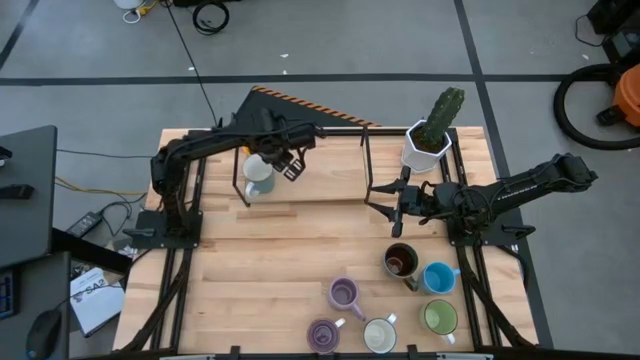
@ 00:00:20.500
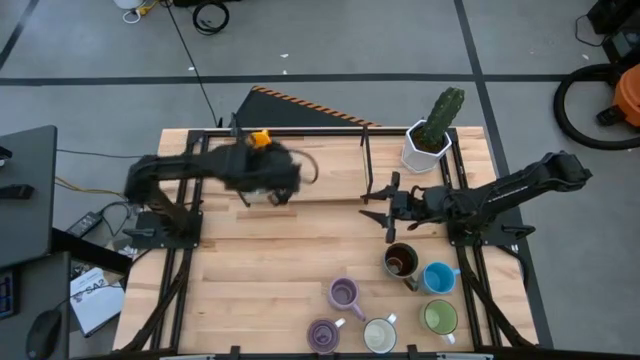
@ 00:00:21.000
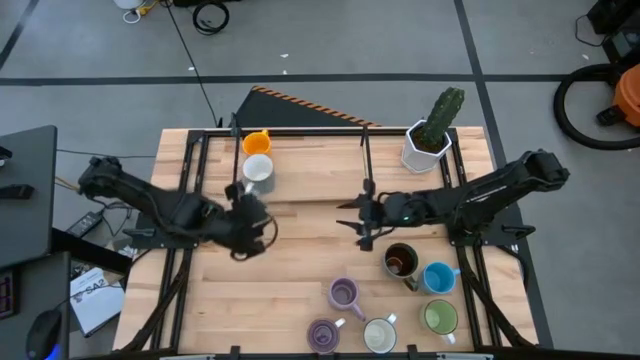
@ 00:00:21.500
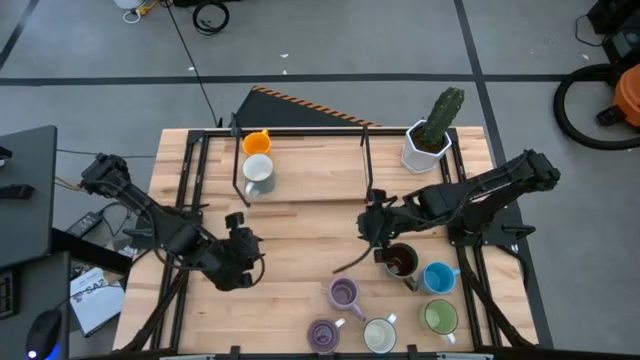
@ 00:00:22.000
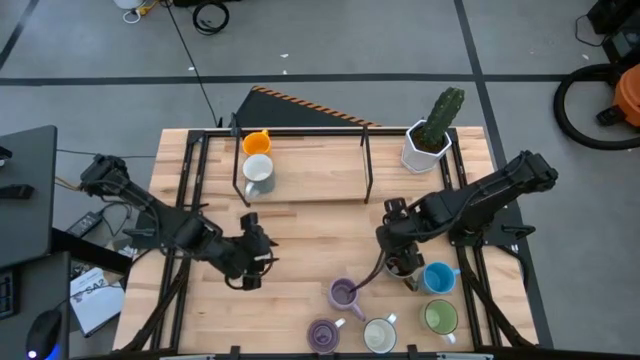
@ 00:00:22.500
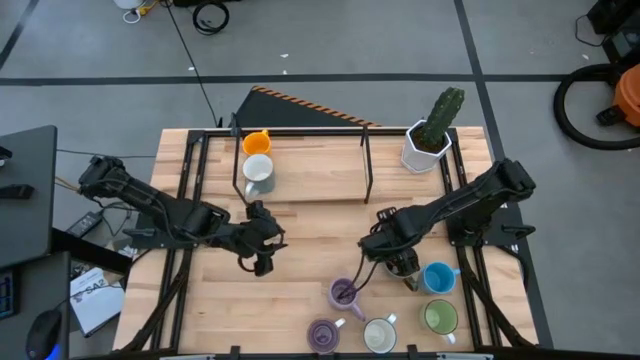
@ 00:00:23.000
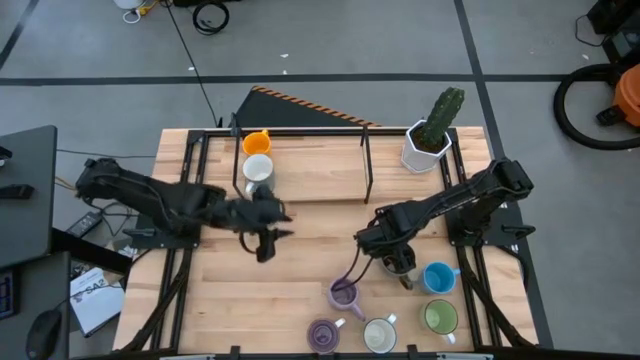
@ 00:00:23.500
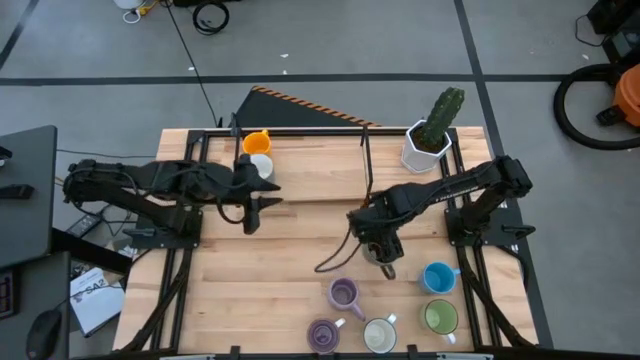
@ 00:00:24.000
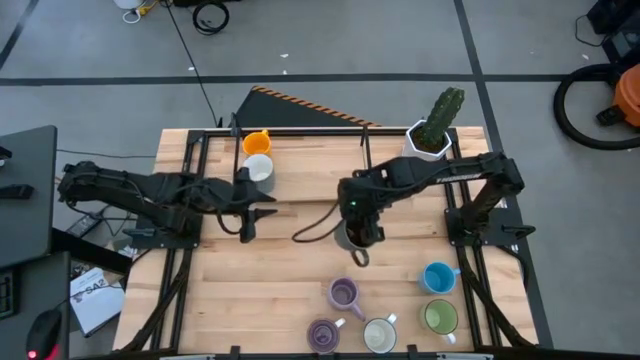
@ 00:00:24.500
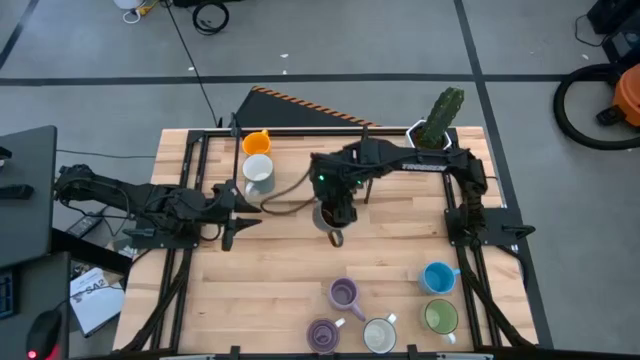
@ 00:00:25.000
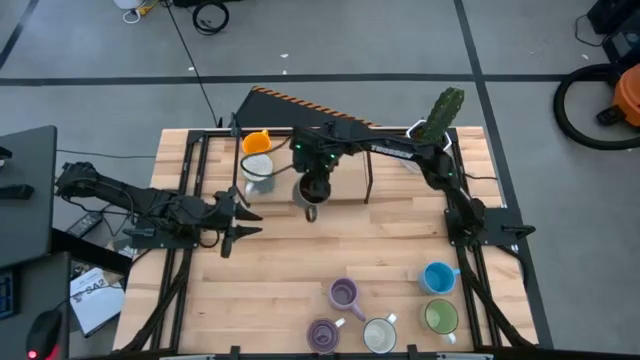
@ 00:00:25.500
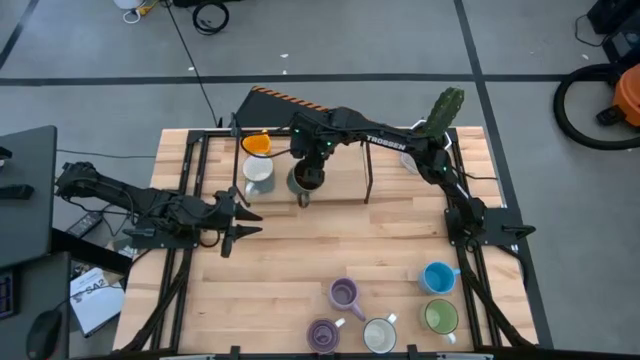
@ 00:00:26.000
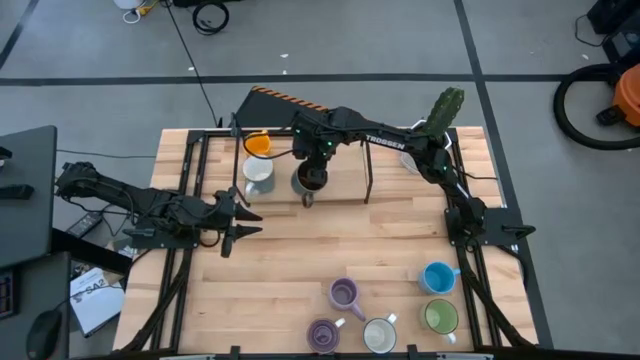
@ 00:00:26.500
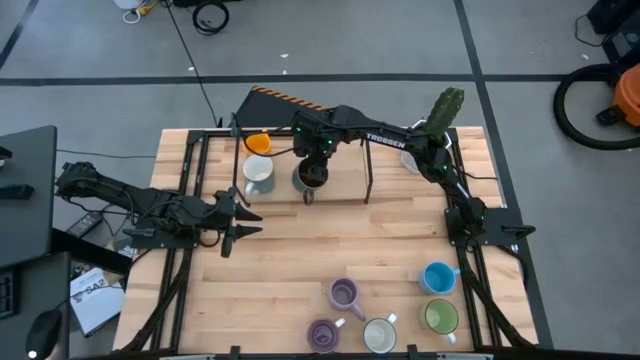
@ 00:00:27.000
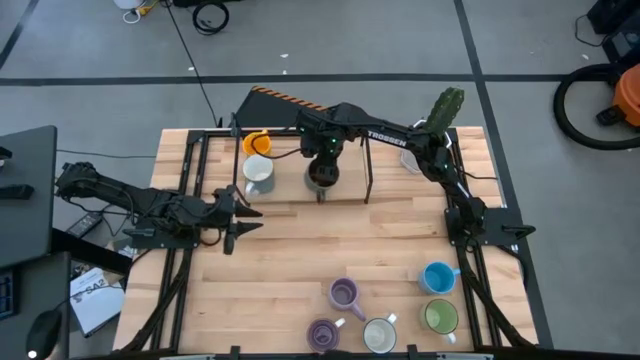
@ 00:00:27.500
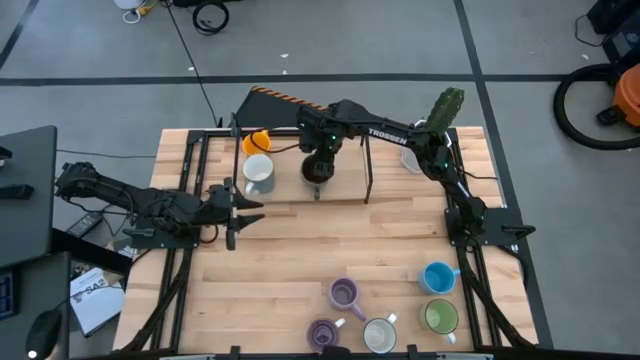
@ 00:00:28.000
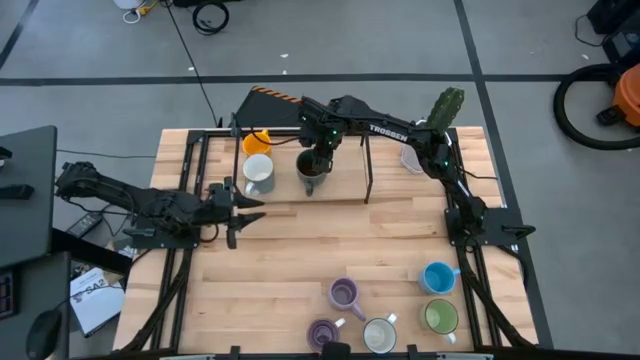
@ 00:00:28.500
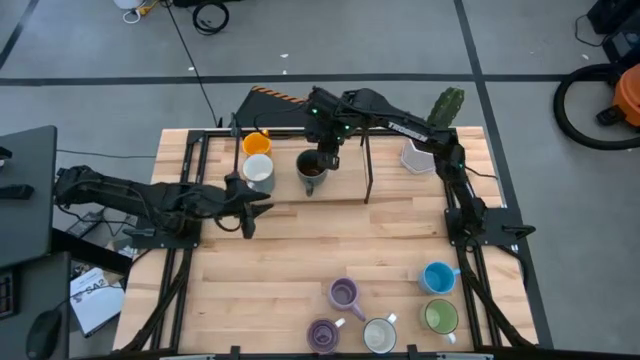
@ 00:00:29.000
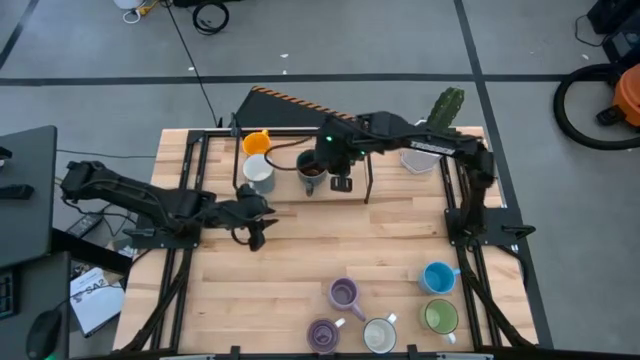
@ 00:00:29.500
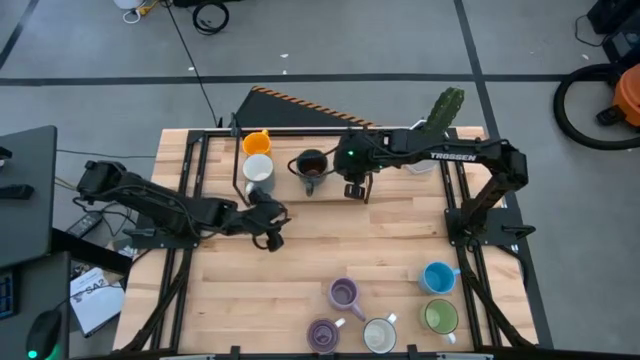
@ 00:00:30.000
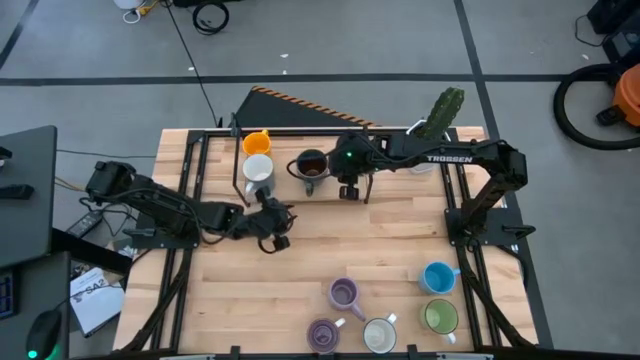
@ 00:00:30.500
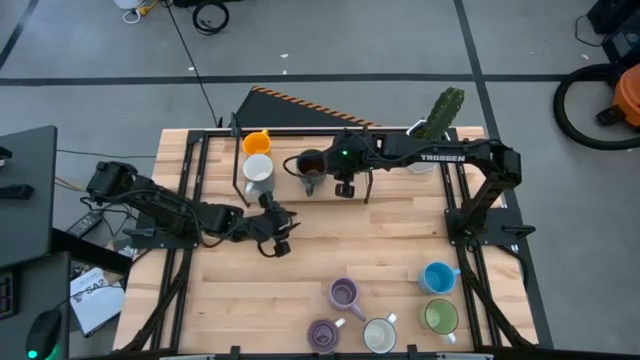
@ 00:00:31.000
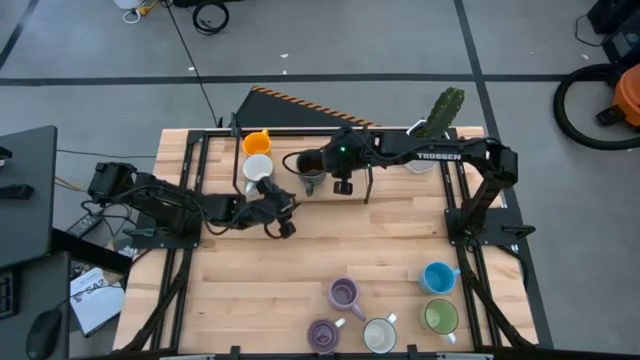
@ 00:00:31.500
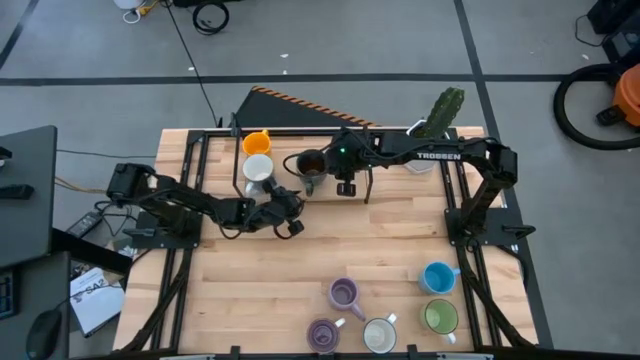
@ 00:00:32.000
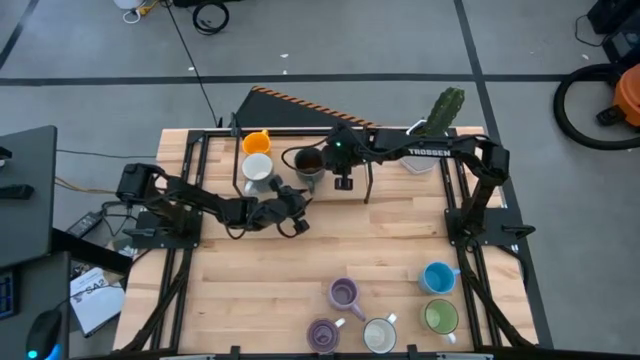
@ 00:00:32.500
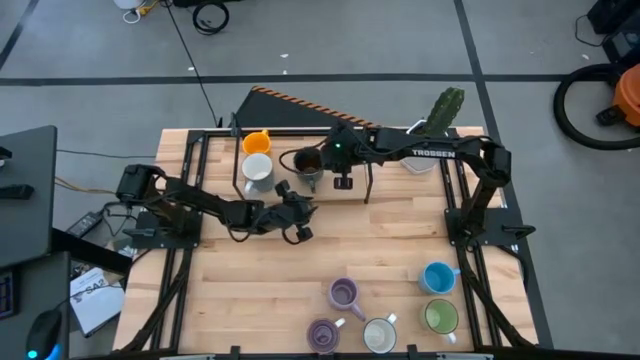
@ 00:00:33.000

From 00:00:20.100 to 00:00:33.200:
Task: Place coffee mugs
Put the light blue patterned mug on the shelf

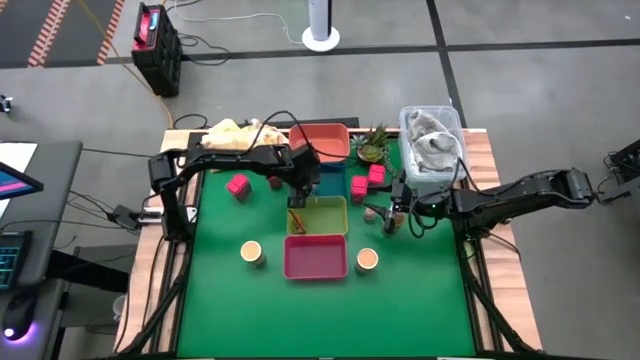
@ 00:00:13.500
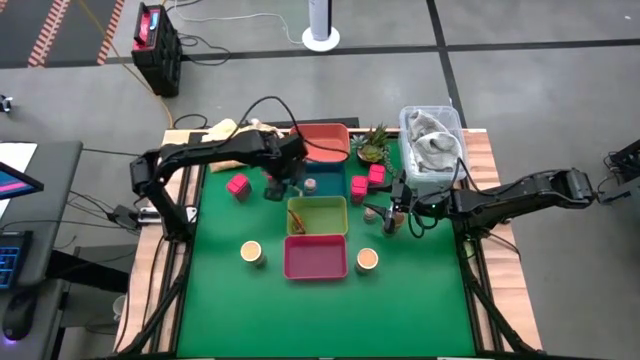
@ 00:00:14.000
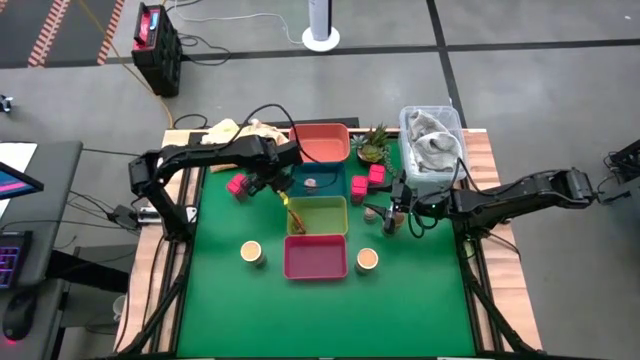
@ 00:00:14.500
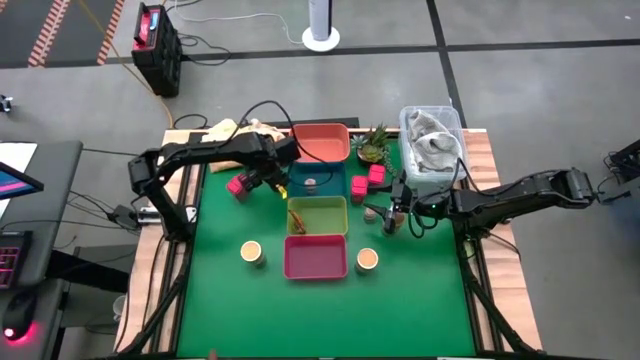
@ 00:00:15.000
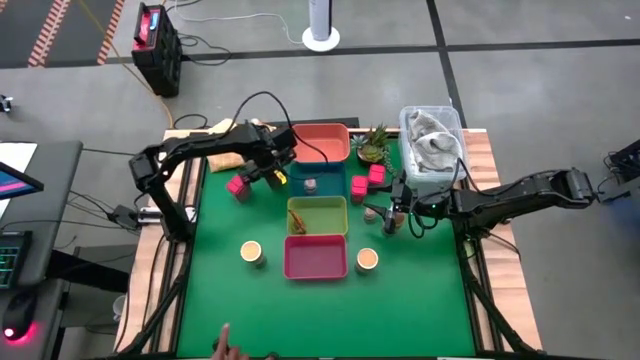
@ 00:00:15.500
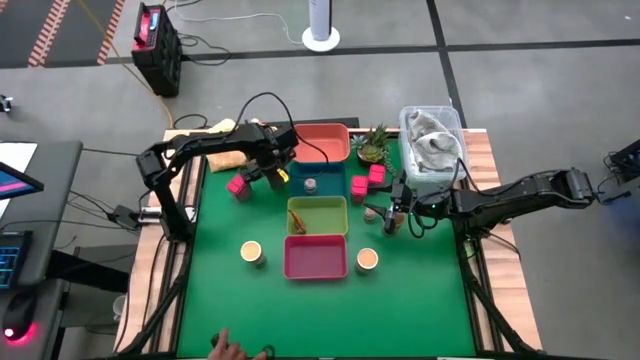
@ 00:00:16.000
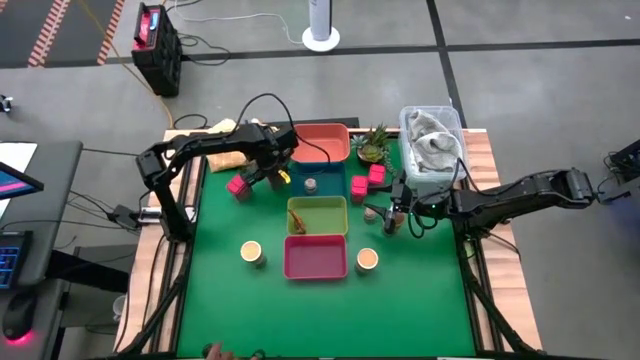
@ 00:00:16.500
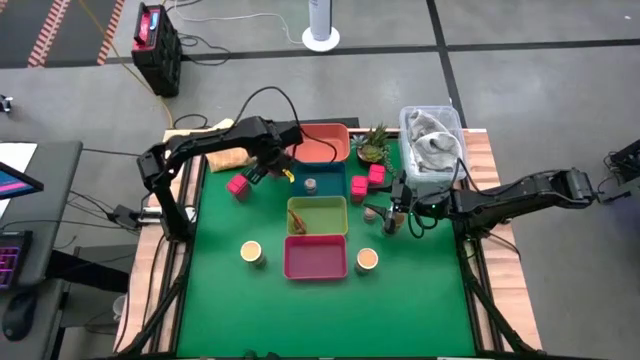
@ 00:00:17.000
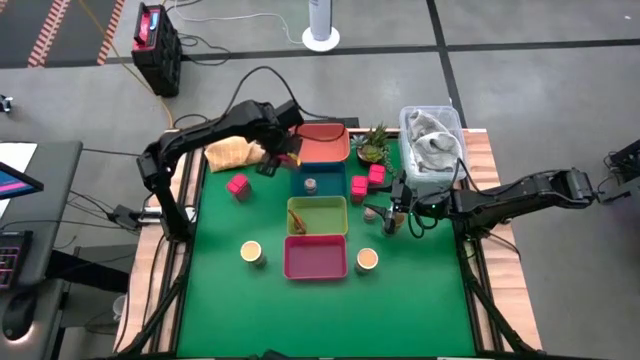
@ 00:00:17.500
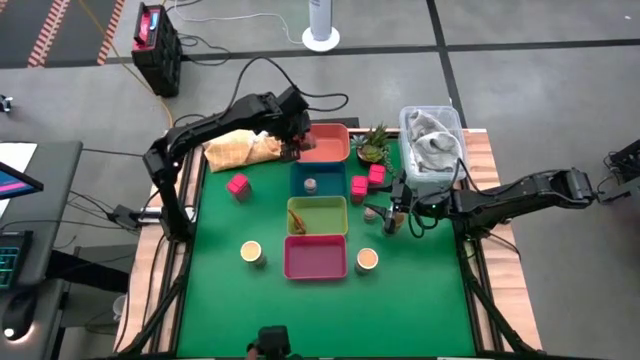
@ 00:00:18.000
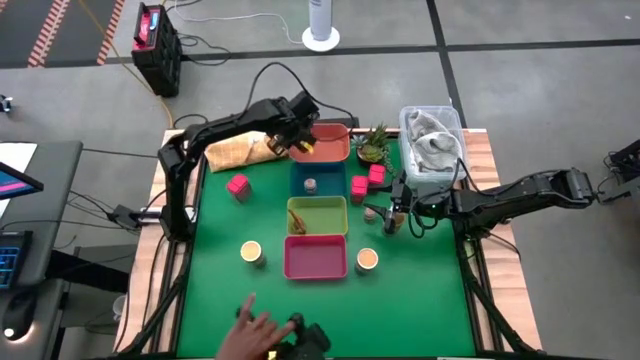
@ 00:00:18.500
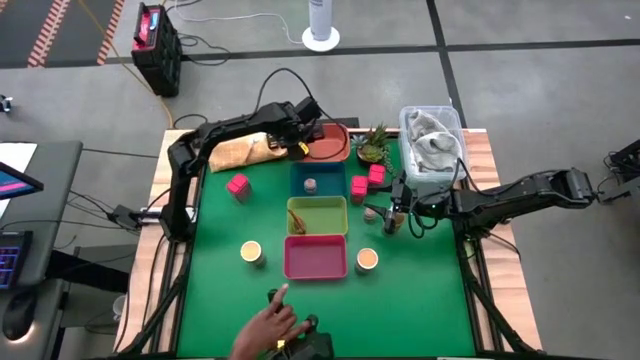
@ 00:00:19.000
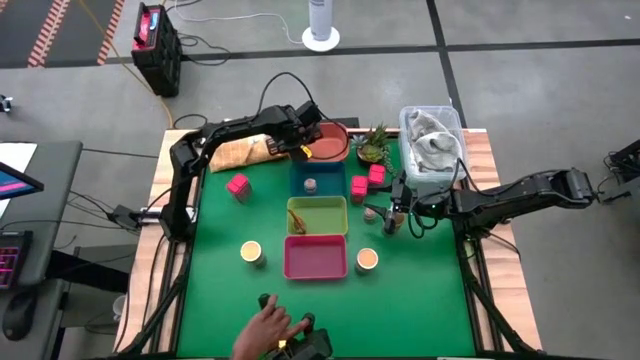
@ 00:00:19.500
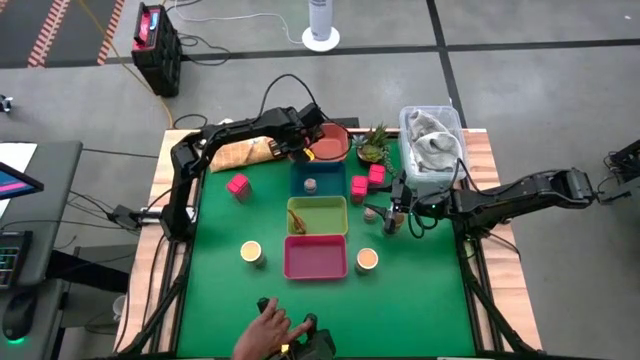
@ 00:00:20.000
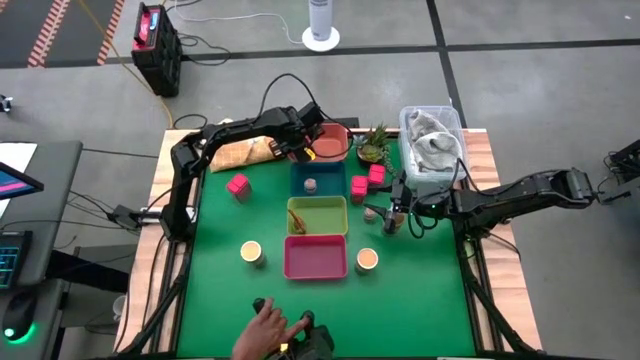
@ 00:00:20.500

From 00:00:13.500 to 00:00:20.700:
Task: Sort spices by type
Put the red seasoning can into the orange bin
